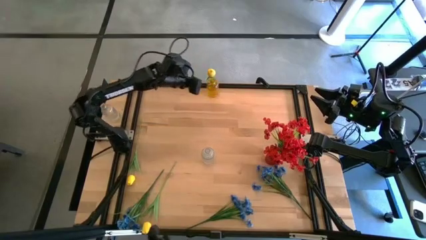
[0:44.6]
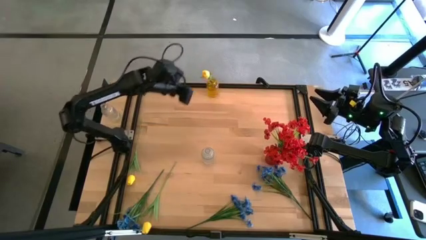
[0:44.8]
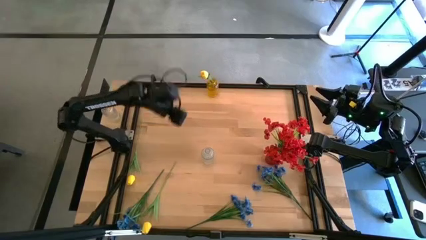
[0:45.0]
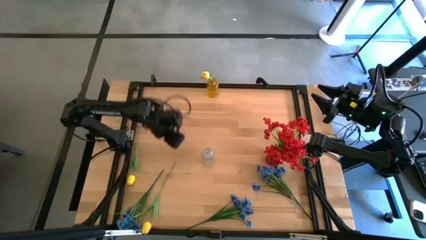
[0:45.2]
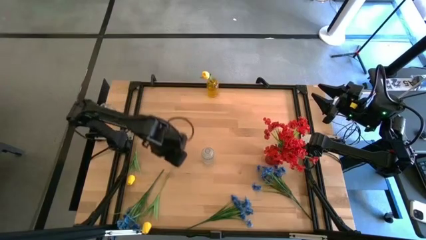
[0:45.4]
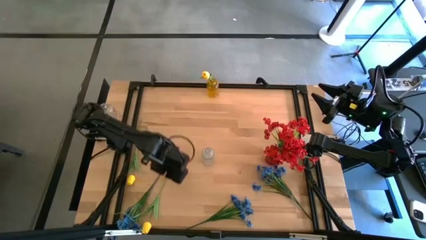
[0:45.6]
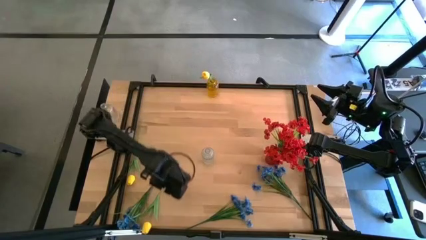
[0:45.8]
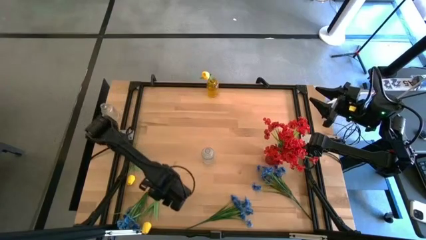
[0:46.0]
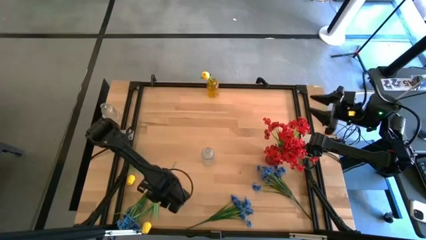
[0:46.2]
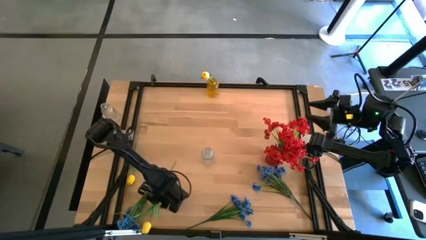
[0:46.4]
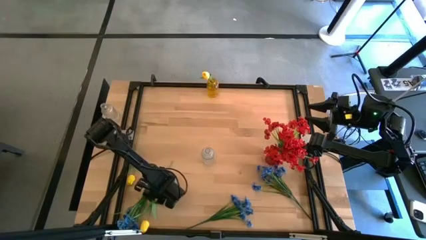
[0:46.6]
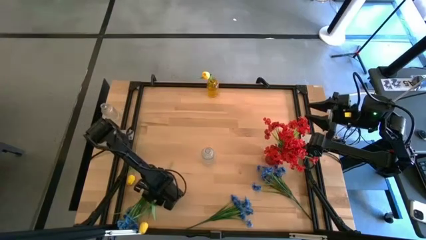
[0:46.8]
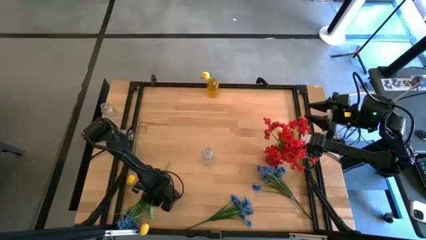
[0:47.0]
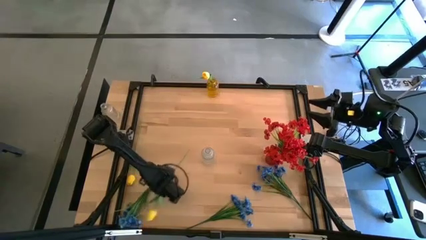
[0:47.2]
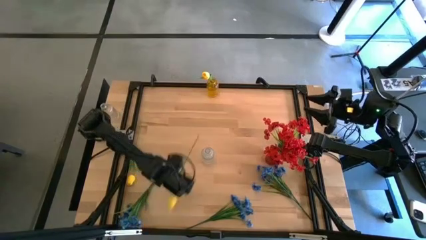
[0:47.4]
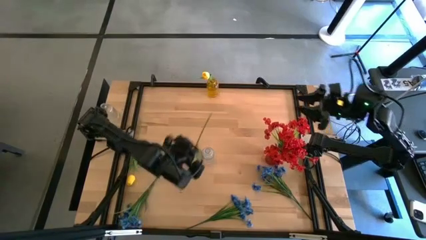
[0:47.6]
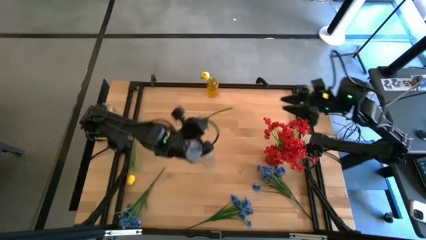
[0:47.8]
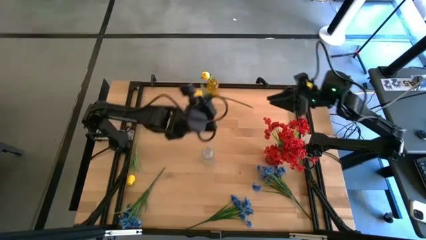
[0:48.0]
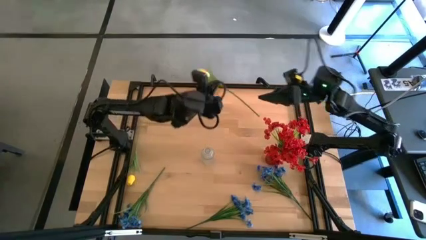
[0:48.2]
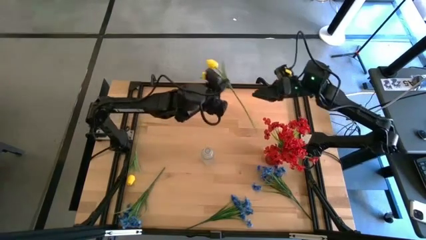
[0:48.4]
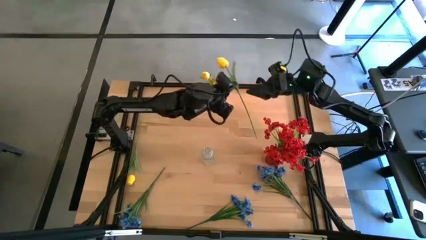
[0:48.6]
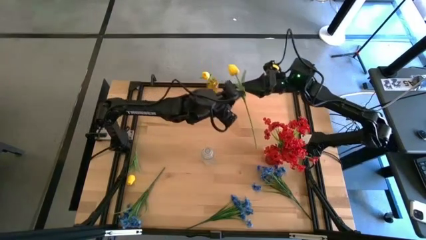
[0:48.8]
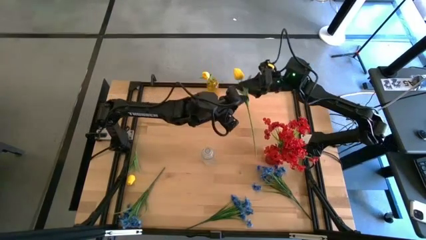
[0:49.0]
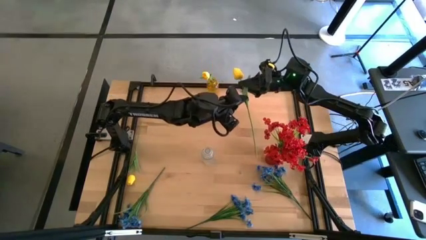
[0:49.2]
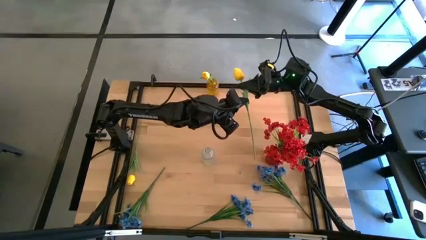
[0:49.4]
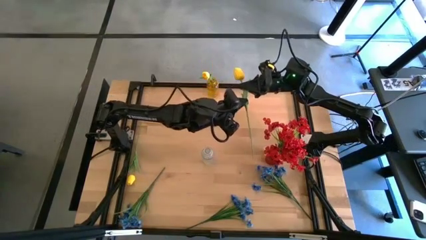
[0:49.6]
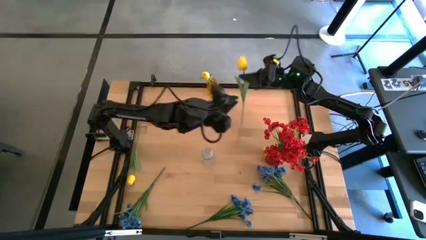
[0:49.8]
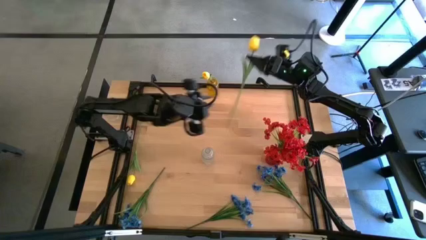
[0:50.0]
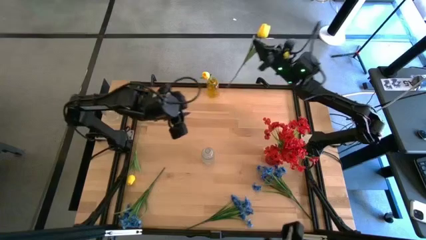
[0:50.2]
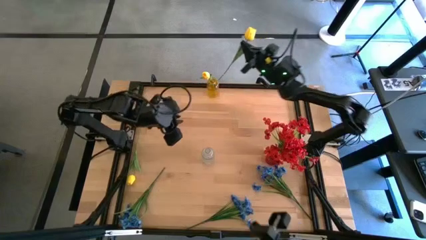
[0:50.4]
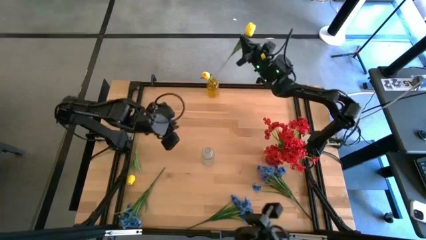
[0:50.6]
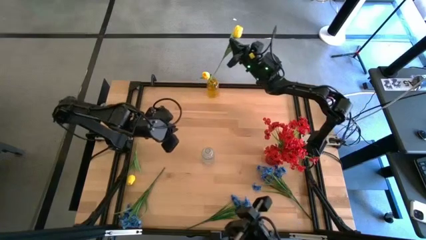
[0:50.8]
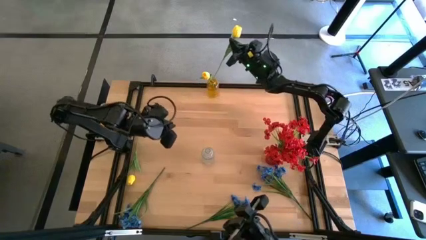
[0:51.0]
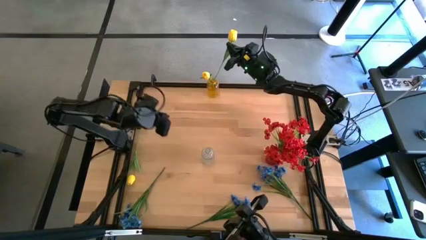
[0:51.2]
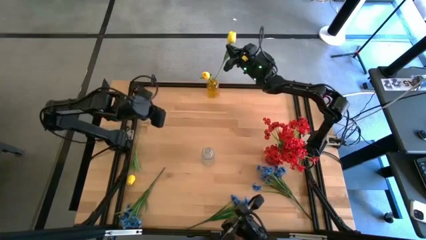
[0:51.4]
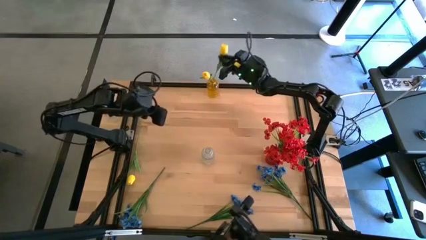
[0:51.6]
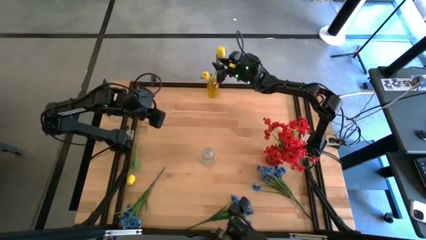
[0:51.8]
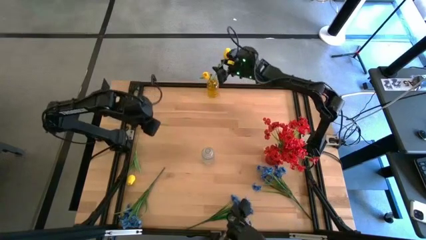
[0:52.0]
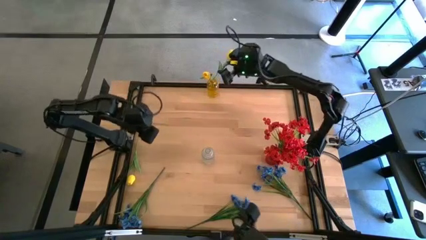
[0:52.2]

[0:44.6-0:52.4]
Task: Sort flowers into vase by color
Put the bottom yellow tulip into the yellow vase

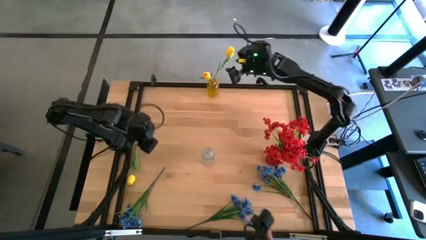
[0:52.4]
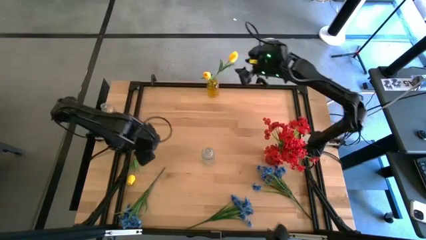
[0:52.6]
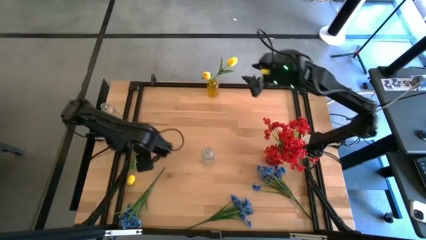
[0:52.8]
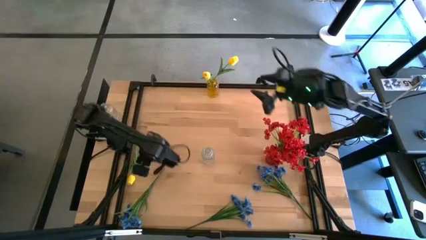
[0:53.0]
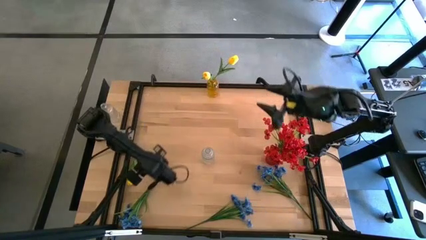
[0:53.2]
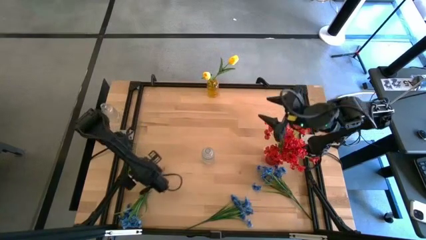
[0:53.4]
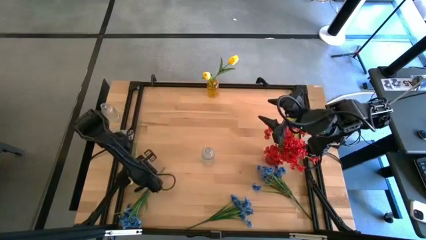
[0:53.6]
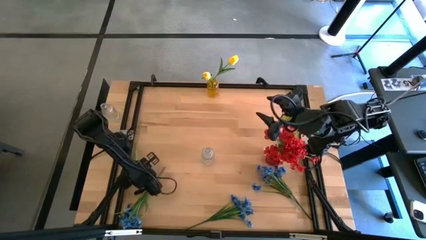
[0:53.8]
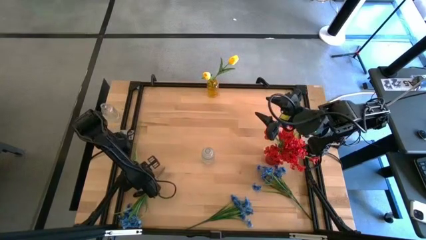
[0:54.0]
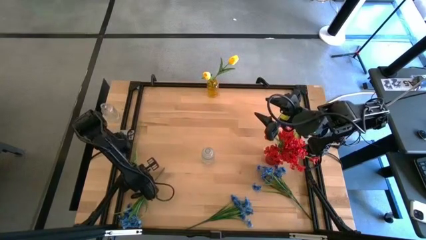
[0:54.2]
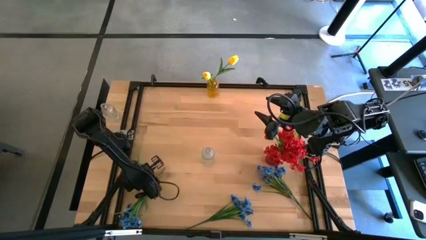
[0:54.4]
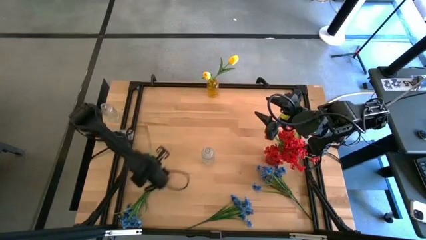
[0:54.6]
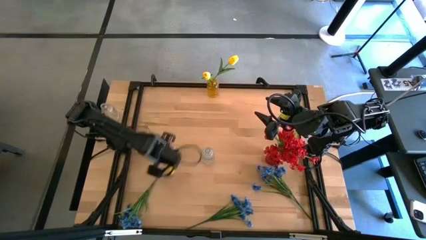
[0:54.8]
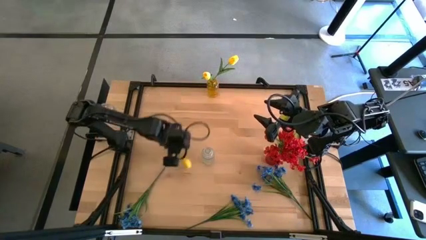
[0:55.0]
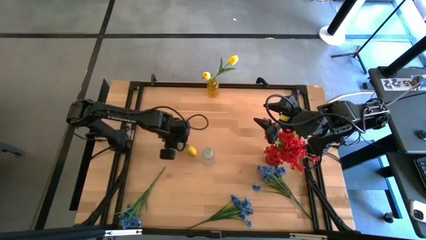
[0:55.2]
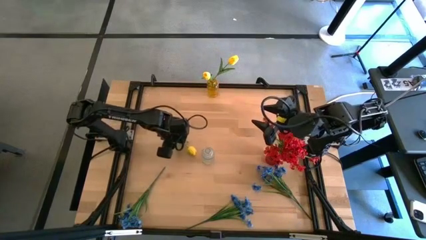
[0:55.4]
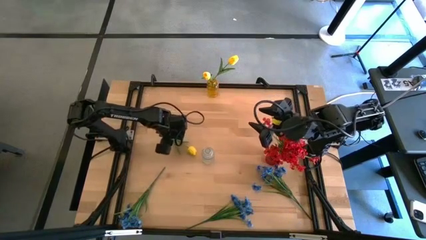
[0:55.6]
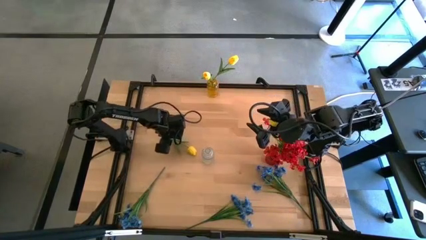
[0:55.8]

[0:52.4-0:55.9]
Put the yellow tulip into the yellow vase

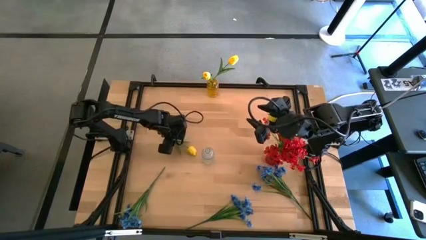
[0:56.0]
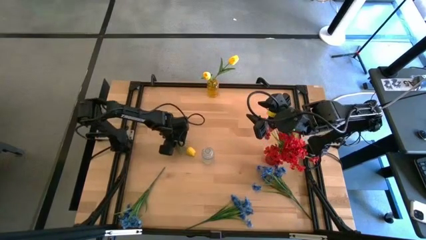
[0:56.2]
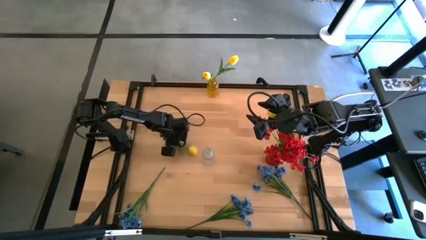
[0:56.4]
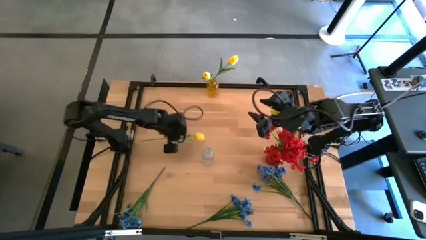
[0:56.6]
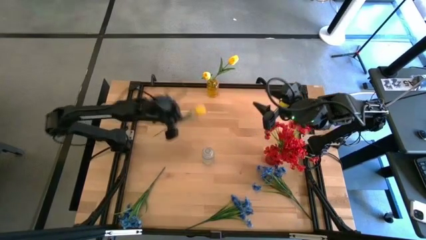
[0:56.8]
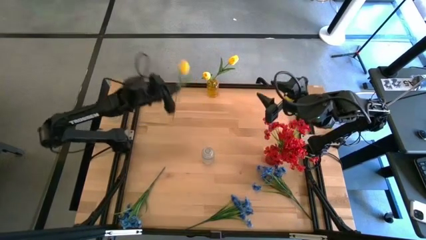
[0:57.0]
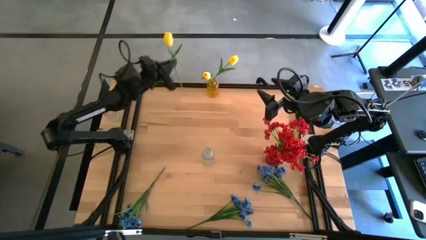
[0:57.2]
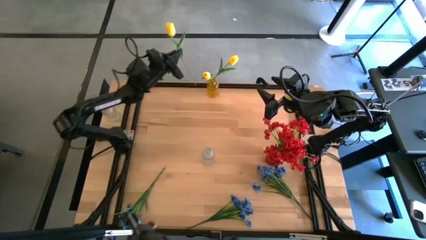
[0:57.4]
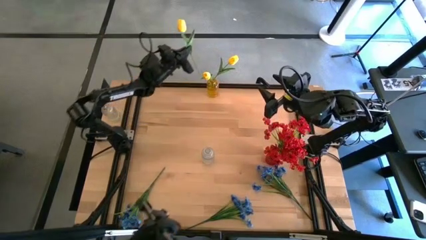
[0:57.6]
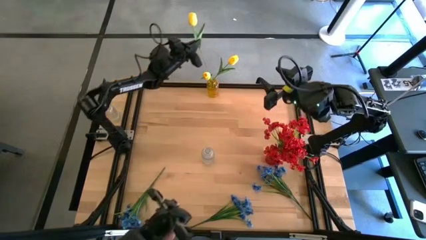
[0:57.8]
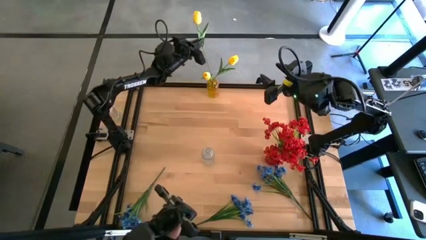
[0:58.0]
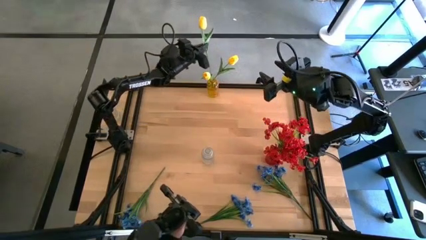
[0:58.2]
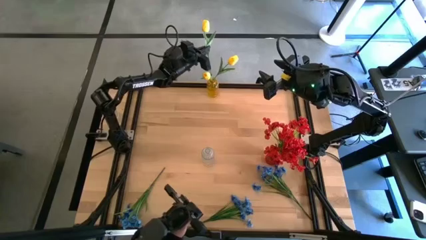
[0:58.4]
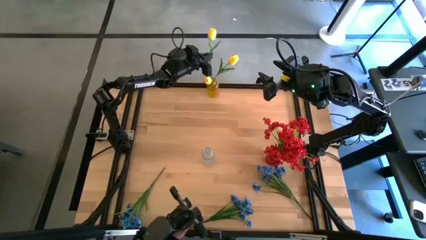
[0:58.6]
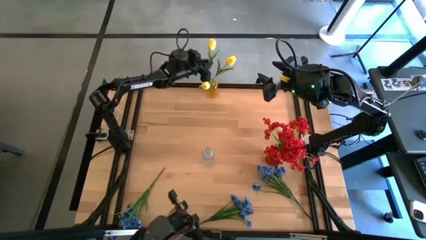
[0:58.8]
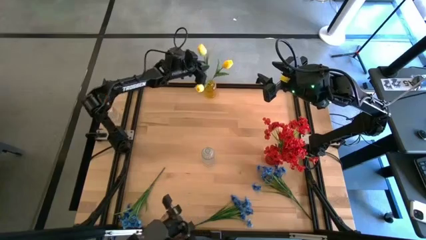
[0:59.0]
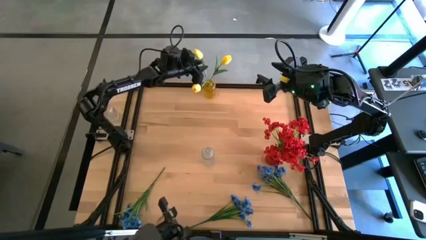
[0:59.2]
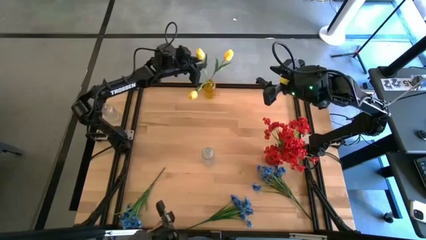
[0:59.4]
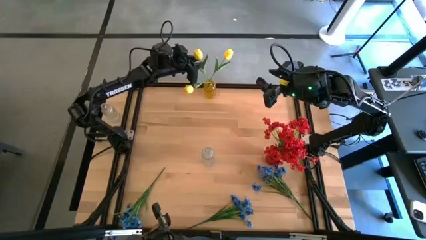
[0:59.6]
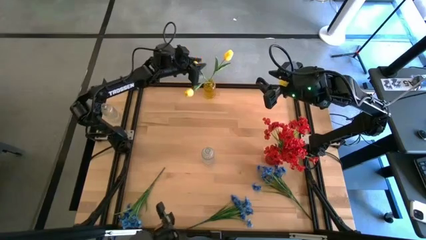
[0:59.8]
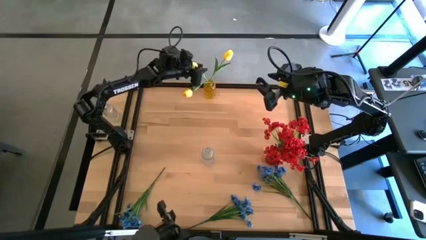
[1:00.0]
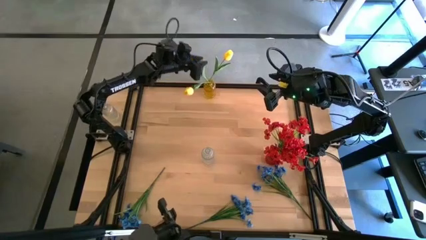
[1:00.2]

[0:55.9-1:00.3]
Put the yellow tulip into the yellow vase
